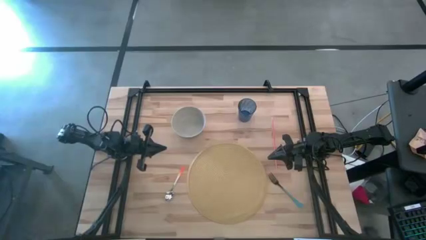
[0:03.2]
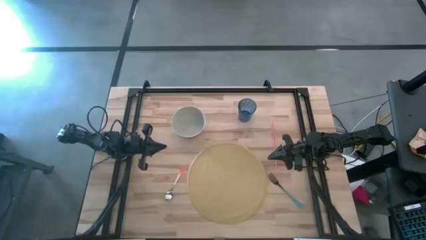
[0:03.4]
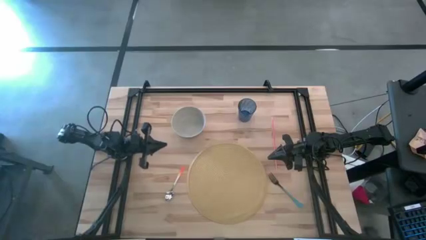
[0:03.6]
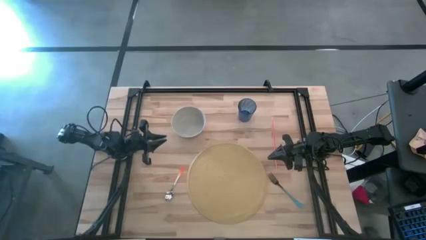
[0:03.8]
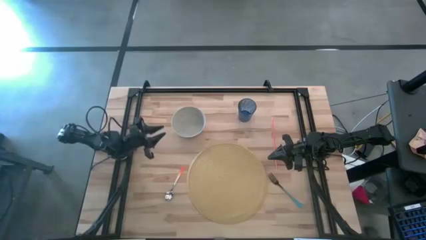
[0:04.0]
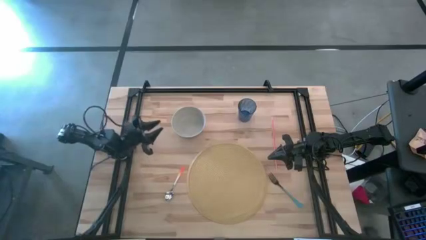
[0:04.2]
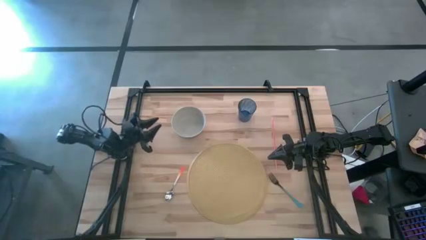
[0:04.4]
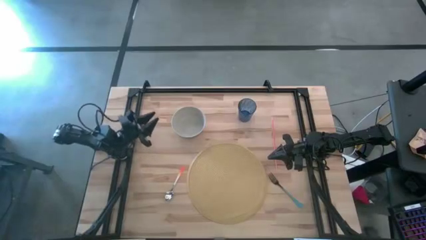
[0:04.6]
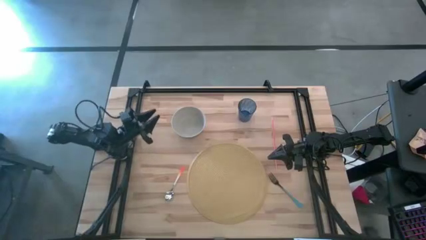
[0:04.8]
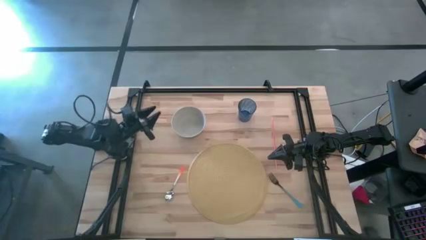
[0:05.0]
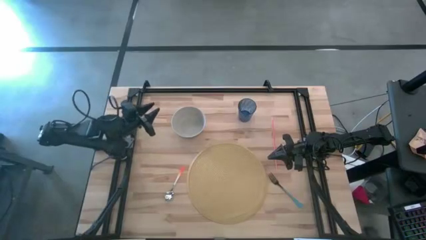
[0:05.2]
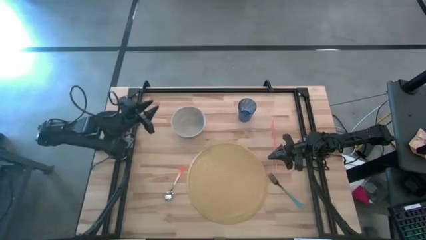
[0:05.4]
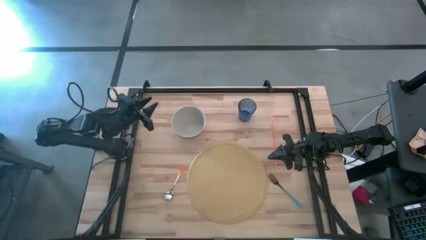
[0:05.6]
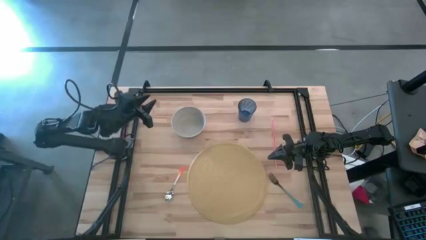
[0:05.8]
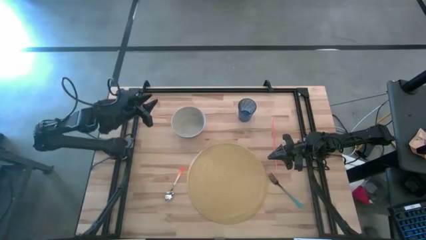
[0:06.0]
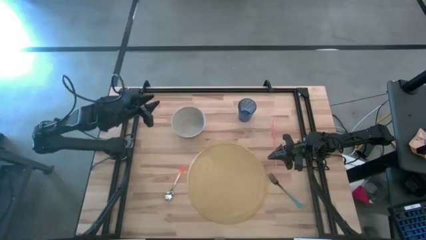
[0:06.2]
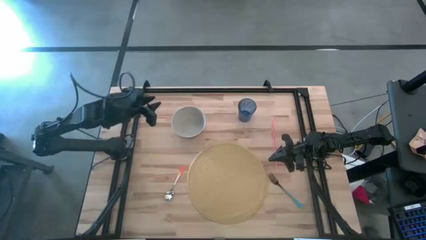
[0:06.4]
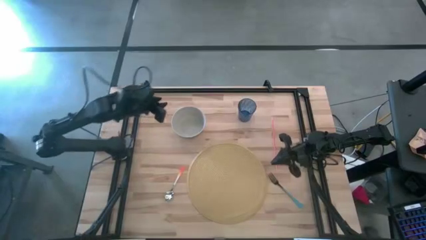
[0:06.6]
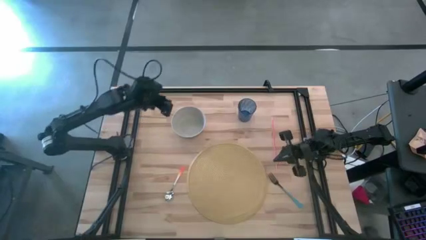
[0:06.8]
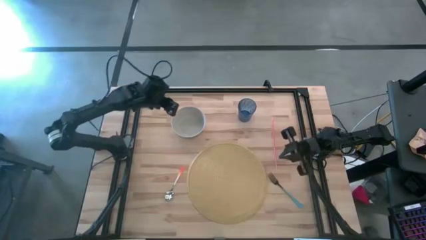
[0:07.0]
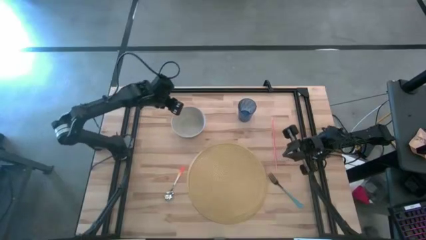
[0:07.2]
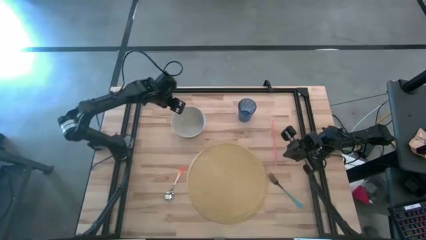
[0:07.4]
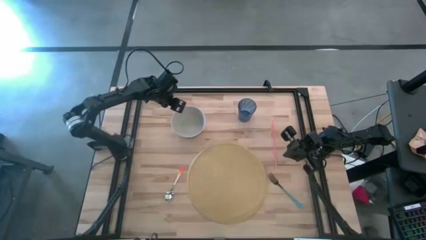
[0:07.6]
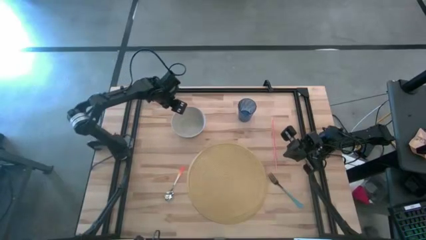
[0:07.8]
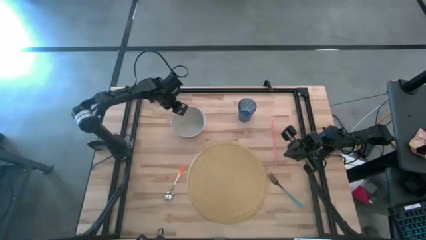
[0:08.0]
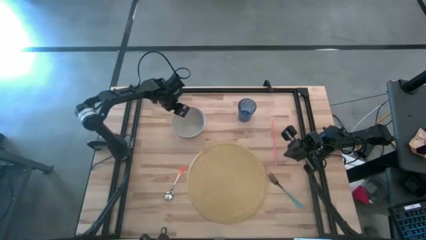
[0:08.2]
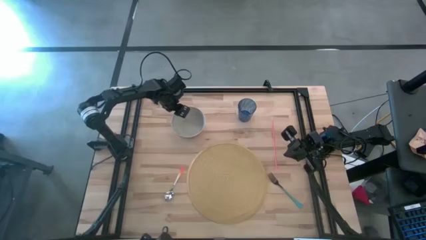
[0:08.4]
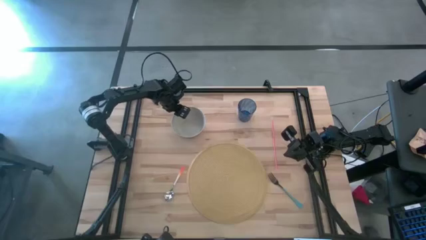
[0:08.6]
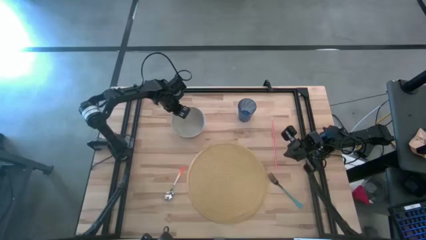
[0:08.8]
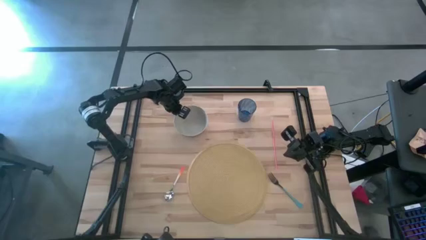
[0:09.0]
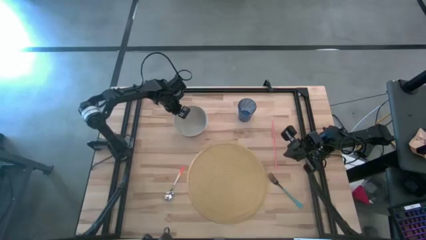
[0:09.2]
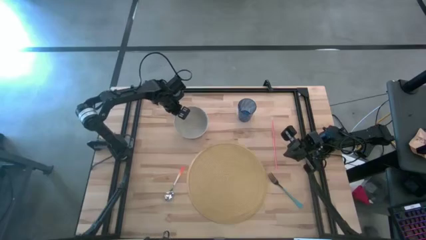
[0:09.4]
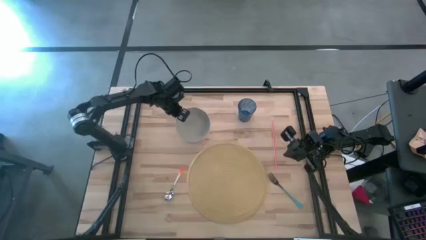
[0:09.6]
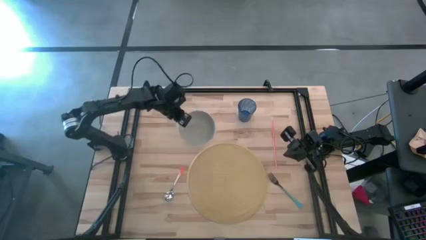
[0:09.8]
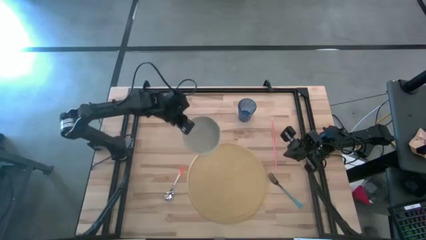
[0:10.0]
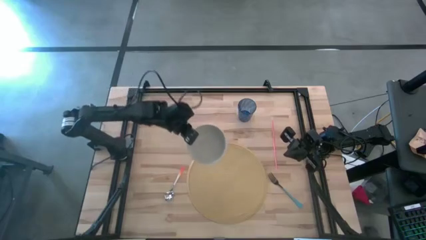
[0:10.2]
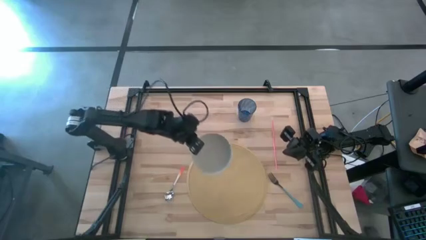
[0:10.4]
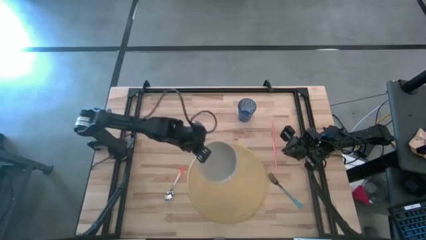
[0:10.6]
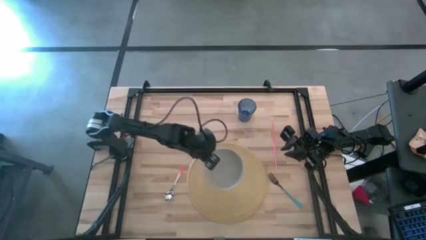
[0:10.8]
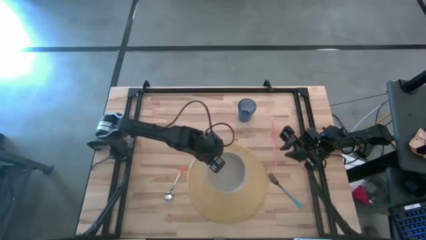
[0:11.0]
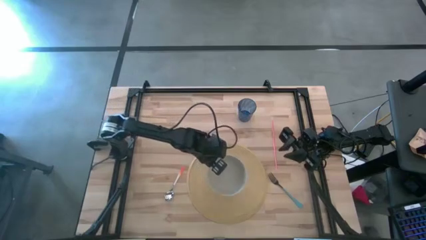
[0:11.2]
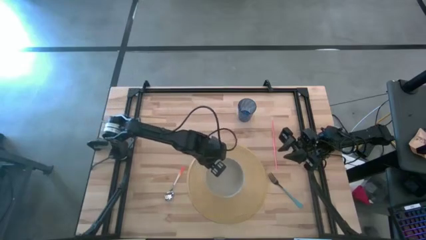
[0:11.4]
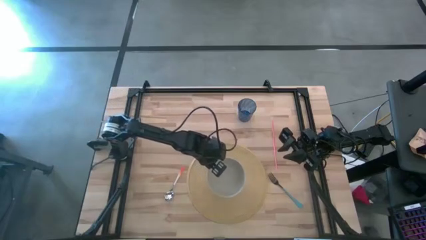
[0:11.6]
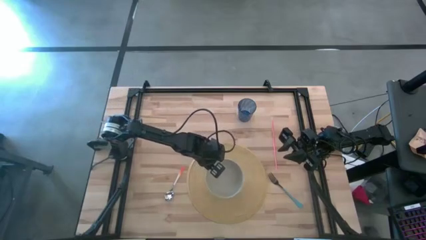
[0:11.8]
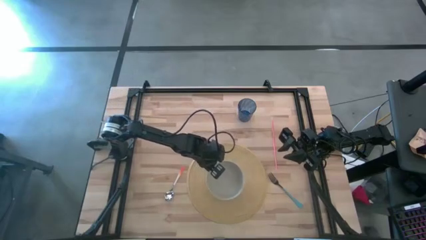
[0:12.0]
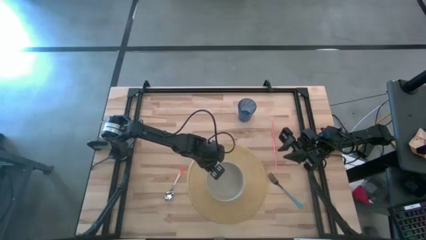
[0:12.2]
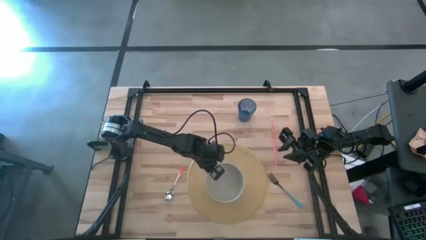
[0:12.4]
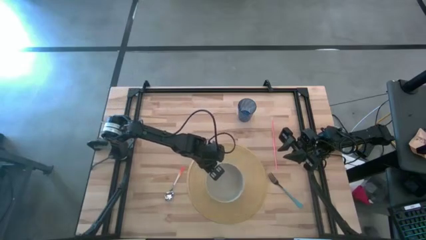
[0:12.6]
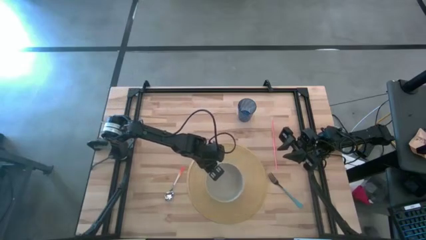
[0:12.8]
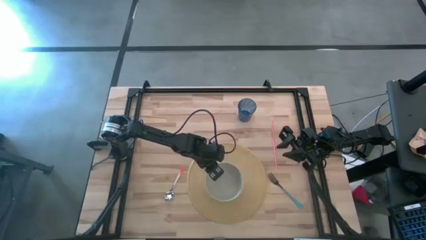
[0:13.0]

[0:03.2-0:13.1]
Task: Pick & Place Utensil
Put the white bowl on the brown placemat

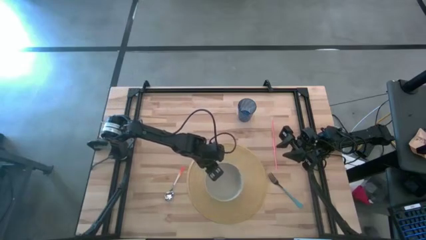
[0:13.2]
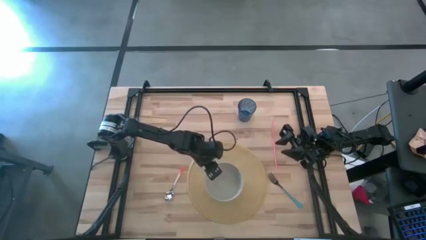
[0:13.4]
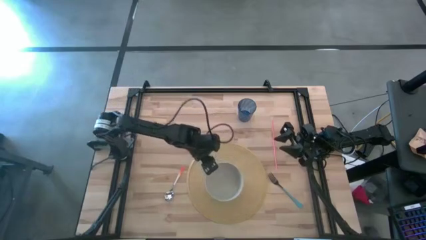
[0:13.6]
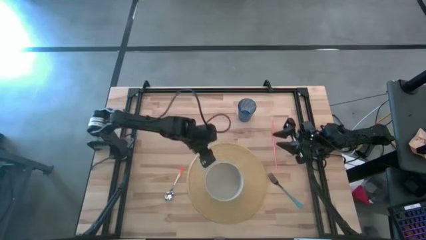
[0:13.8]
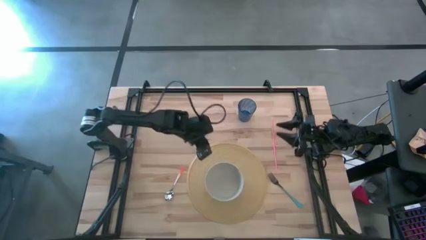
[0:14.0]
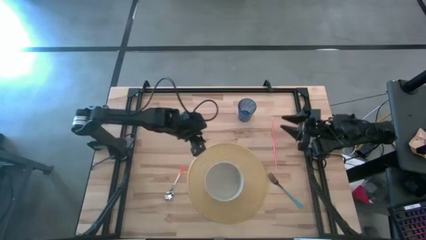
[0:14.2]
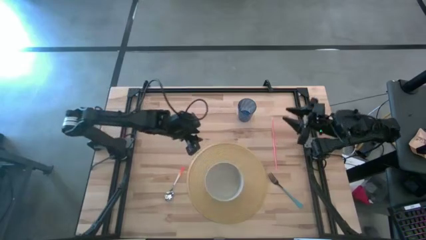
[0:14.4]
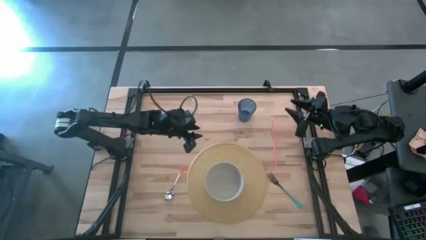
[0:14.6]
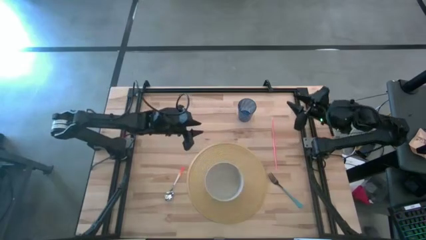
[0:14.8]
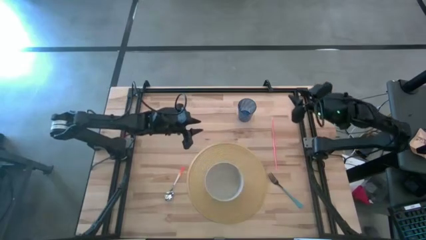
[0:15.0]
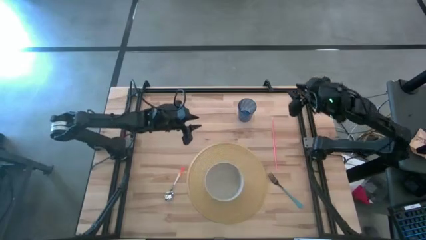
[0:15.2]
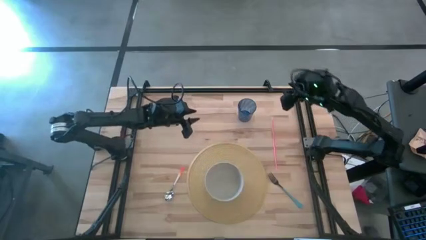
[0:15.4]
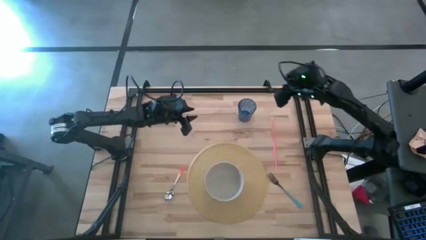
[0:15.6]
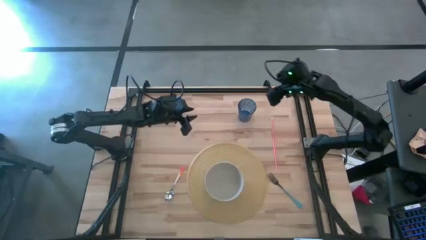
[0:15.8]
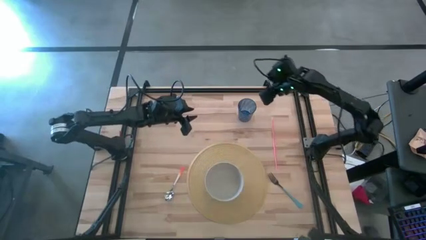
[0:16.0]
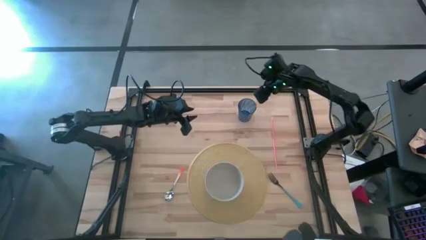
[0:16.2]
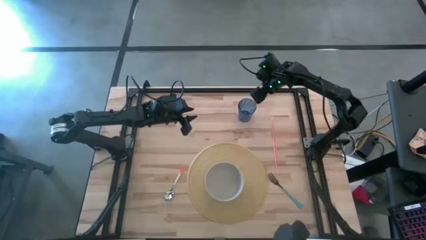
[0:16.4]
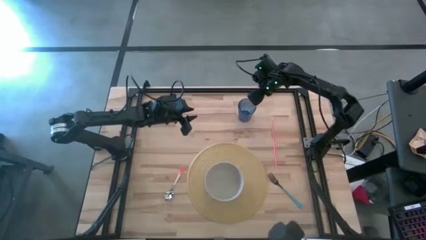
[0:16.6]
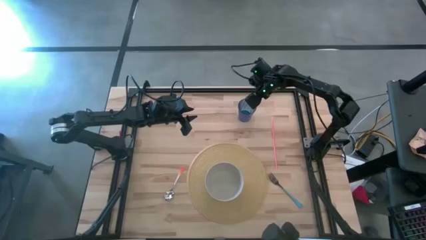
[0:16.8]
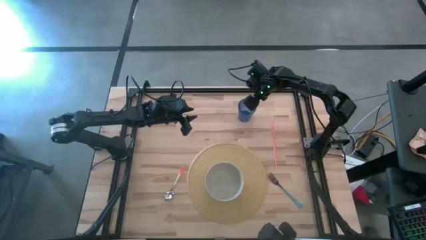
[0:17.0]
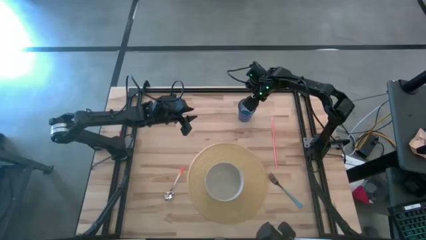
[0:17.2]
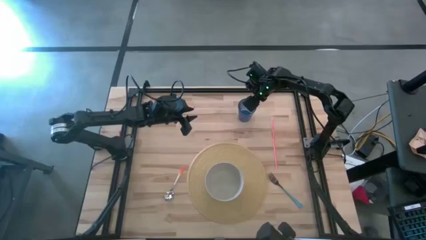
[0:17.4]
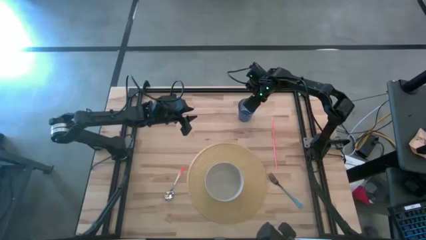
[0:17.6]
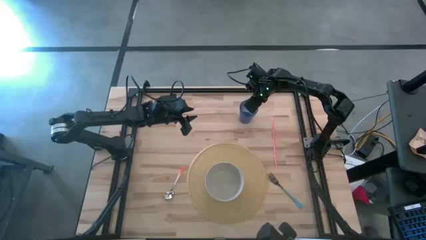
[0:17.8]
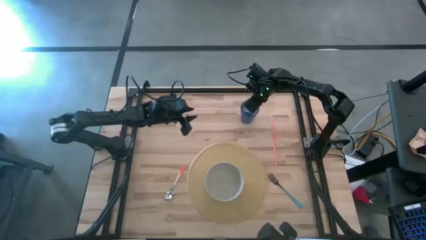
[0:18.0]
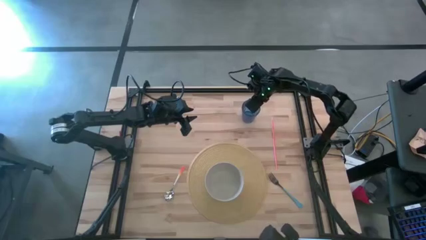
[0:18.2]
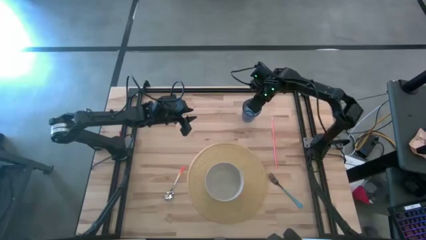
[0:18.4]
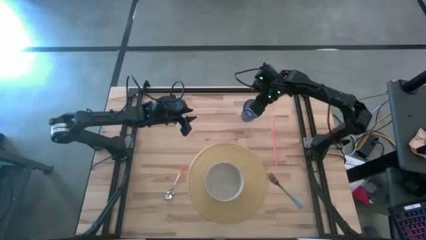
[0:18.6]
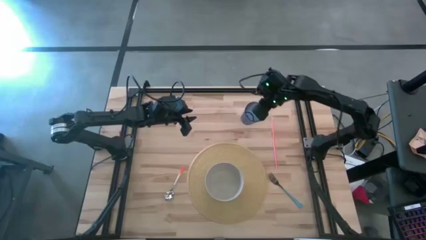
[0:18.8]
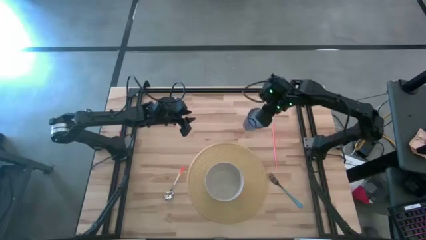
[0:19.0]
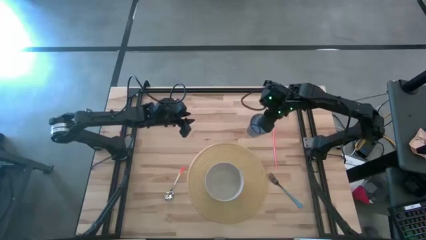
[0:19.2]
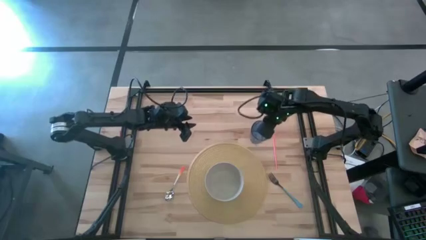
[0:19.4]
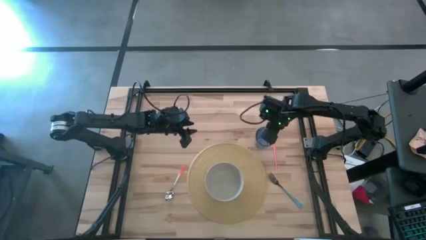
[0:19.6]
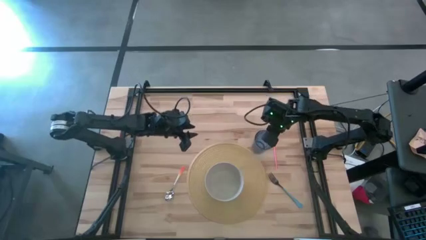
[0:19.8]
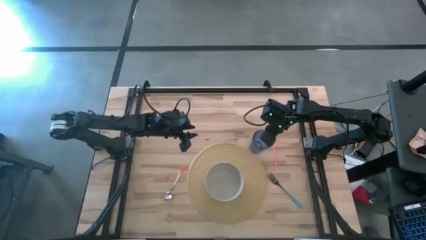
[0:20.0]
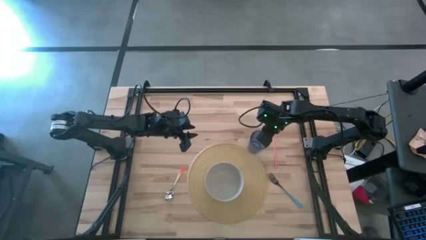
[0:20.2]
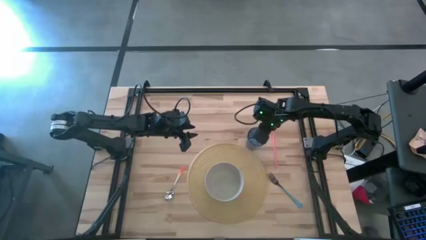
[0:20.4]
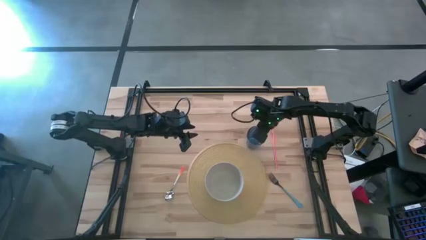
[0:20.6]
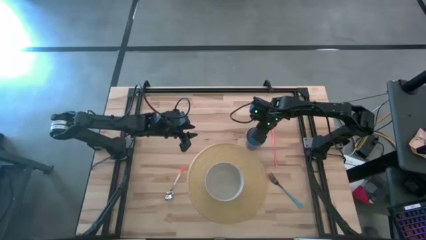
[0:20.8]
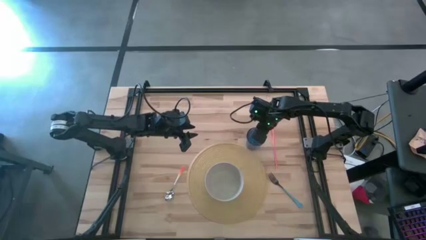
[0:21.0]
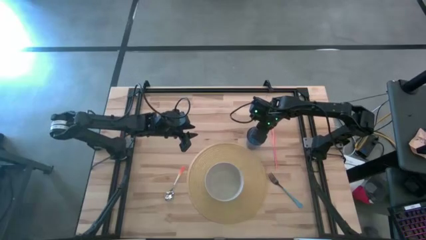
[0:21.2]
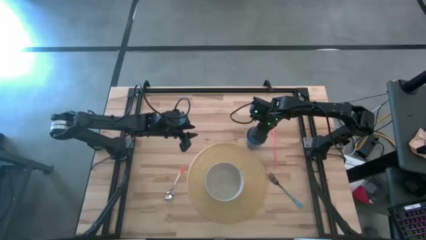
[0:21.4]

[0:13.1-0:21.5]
Move the blue cup to the top right of the brown placemat
